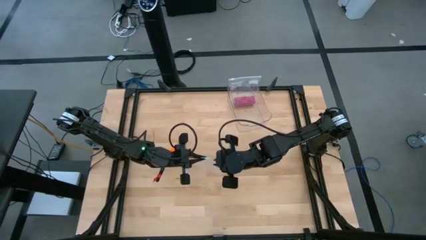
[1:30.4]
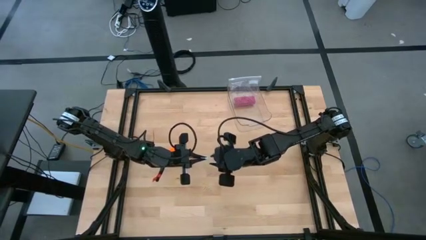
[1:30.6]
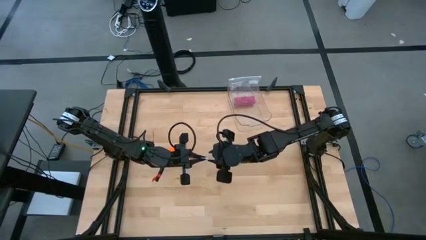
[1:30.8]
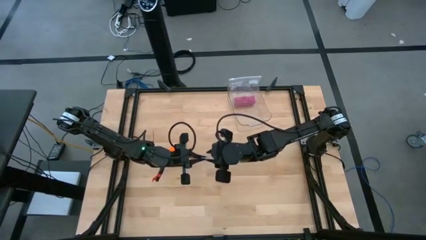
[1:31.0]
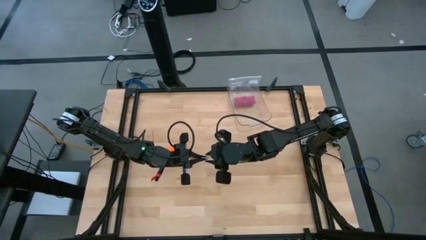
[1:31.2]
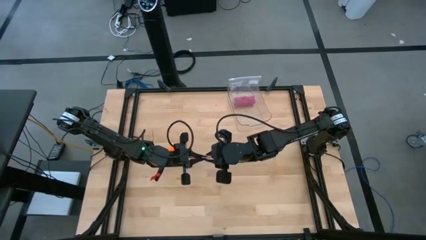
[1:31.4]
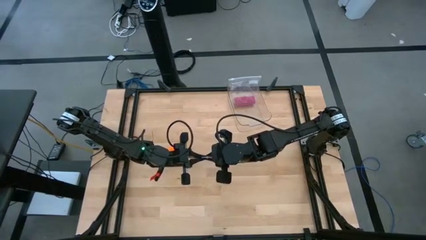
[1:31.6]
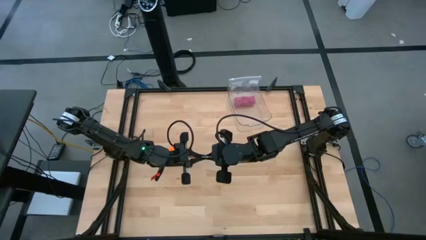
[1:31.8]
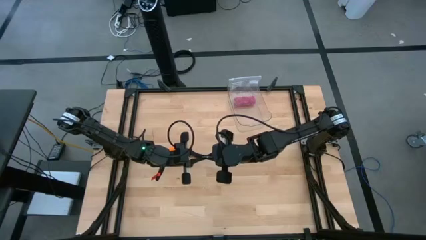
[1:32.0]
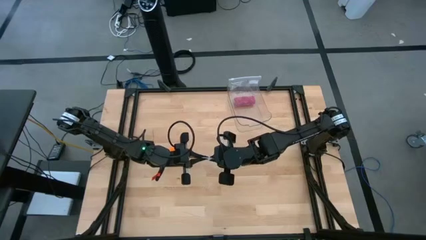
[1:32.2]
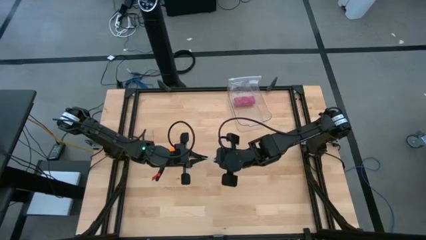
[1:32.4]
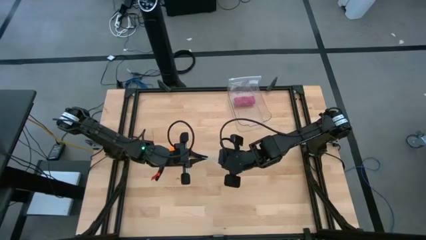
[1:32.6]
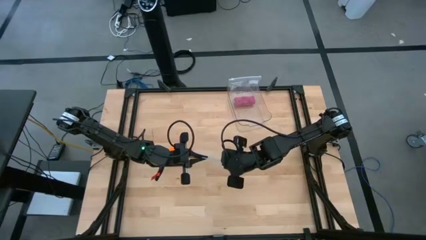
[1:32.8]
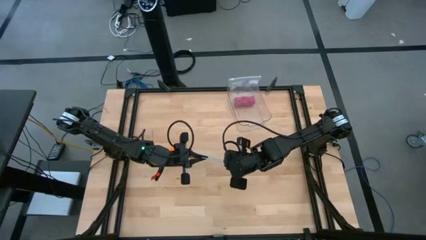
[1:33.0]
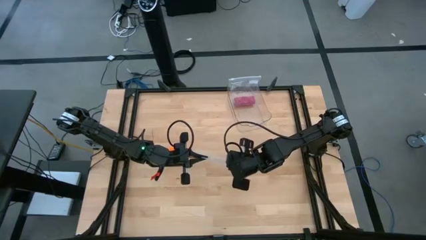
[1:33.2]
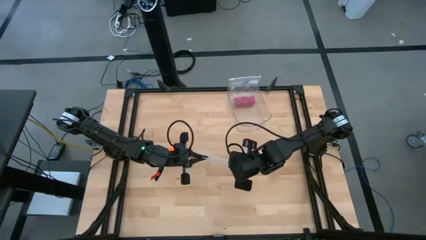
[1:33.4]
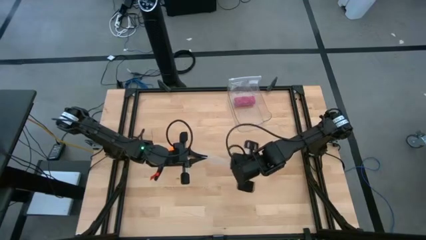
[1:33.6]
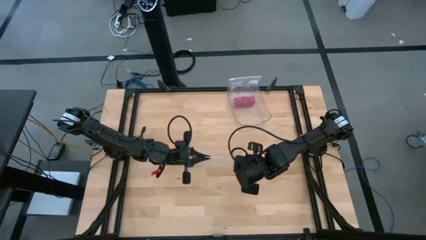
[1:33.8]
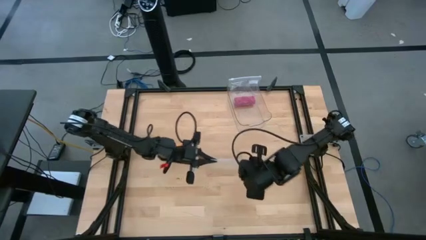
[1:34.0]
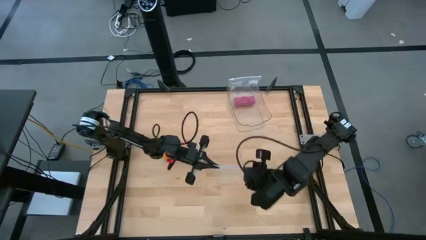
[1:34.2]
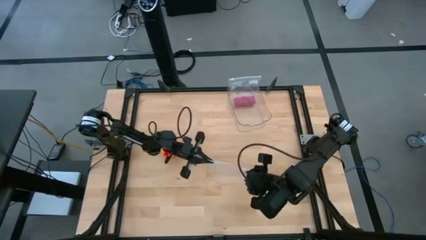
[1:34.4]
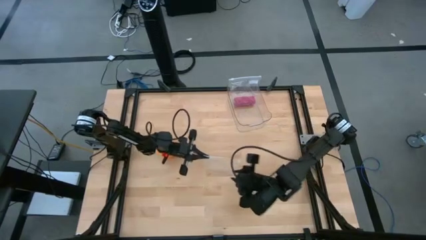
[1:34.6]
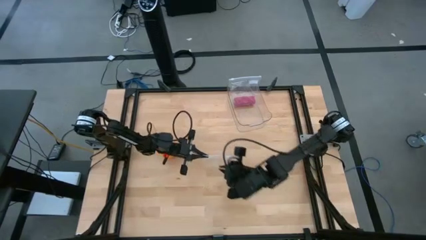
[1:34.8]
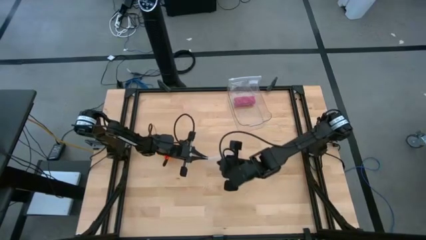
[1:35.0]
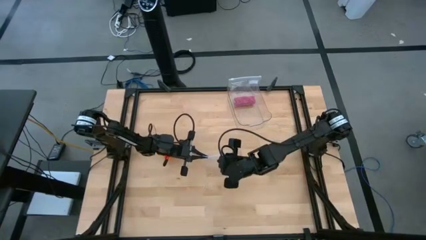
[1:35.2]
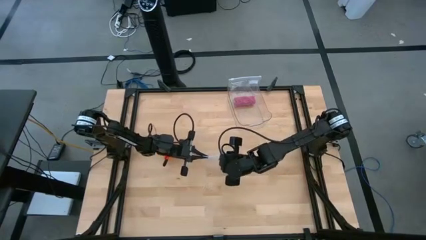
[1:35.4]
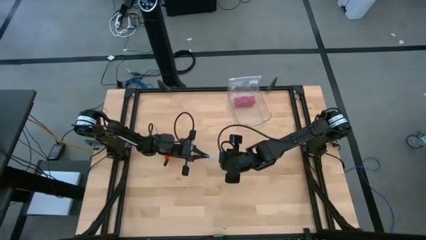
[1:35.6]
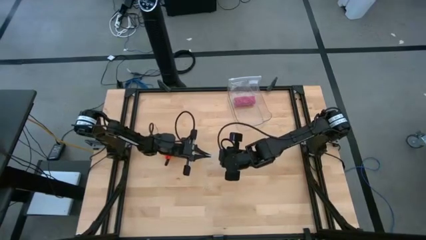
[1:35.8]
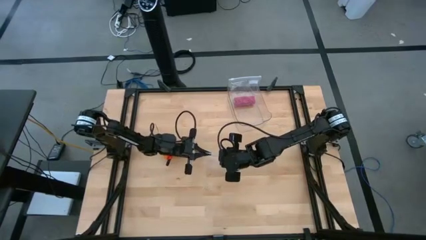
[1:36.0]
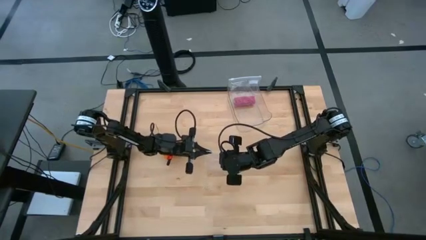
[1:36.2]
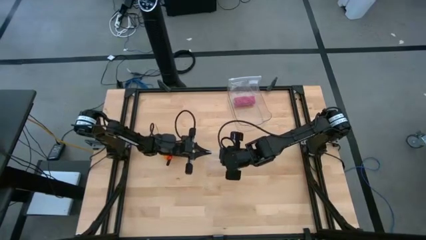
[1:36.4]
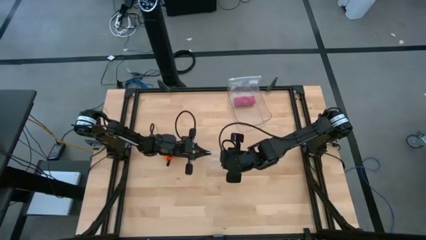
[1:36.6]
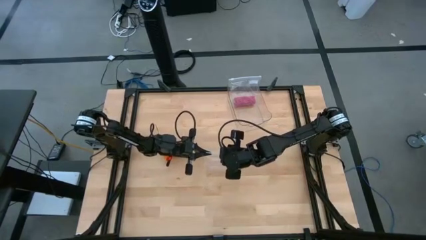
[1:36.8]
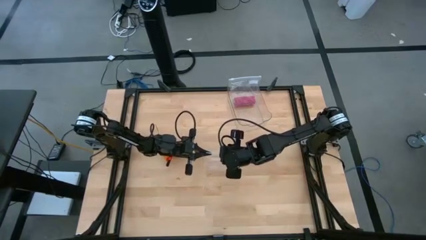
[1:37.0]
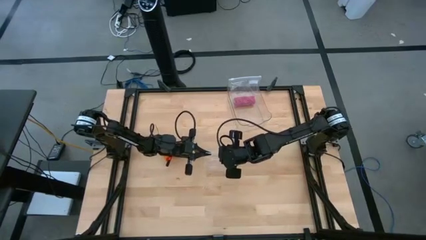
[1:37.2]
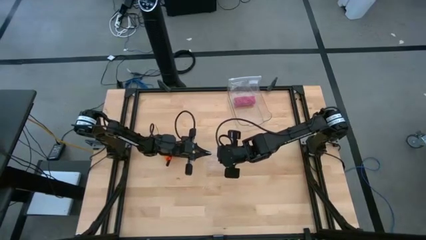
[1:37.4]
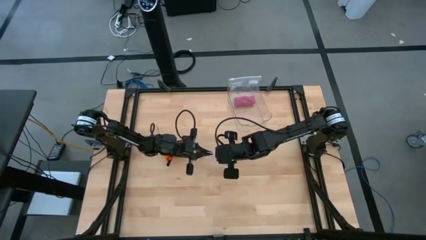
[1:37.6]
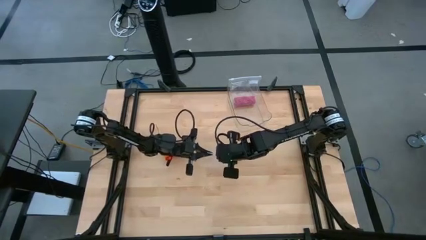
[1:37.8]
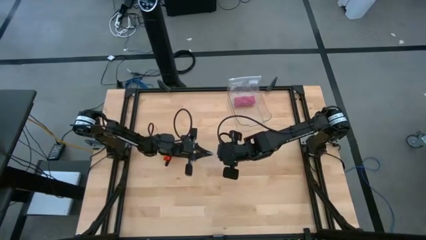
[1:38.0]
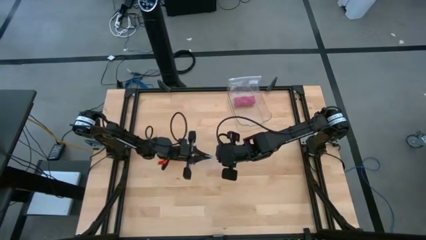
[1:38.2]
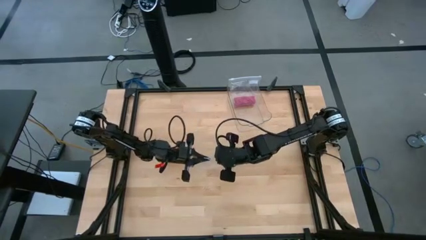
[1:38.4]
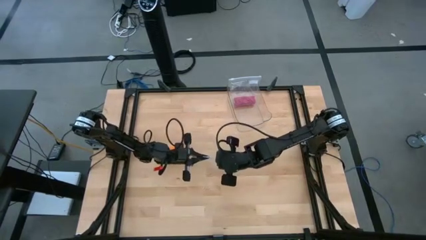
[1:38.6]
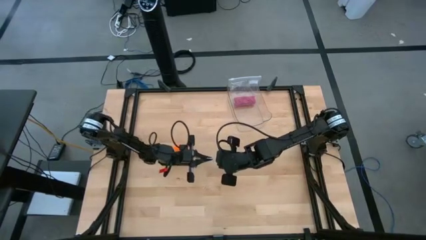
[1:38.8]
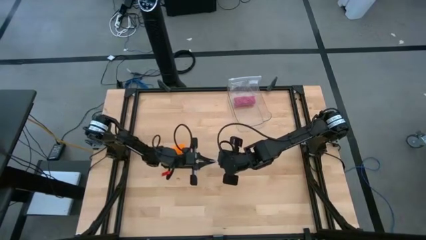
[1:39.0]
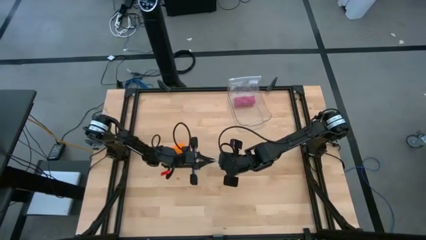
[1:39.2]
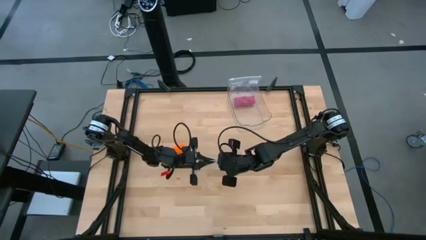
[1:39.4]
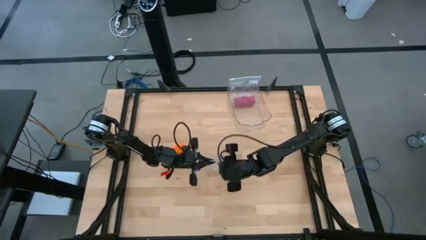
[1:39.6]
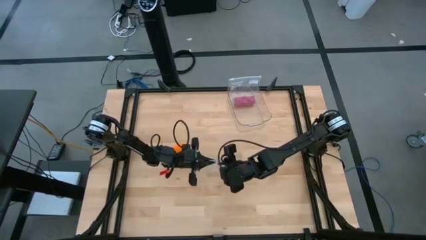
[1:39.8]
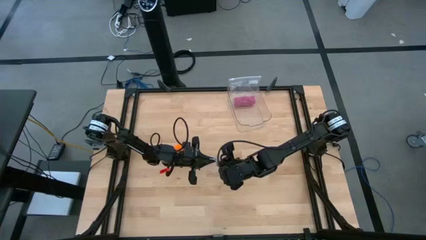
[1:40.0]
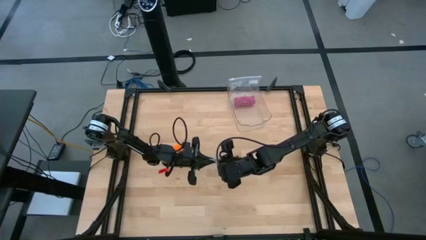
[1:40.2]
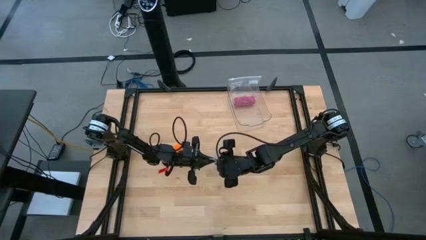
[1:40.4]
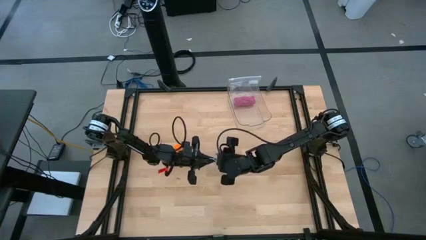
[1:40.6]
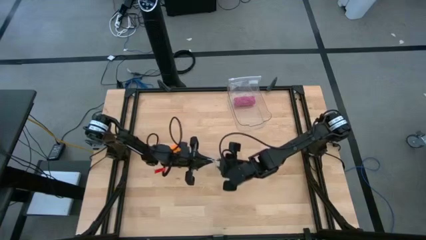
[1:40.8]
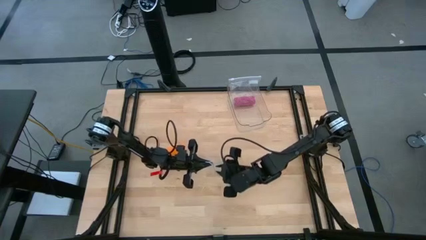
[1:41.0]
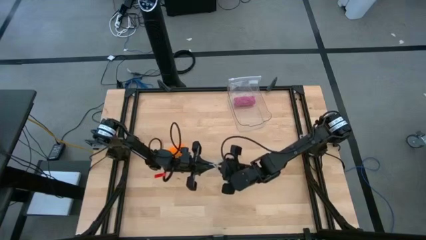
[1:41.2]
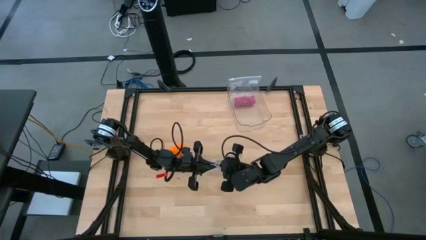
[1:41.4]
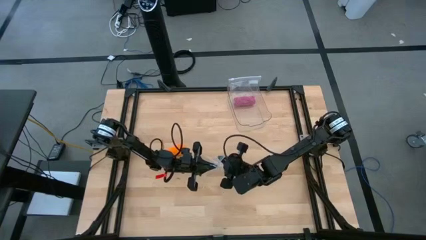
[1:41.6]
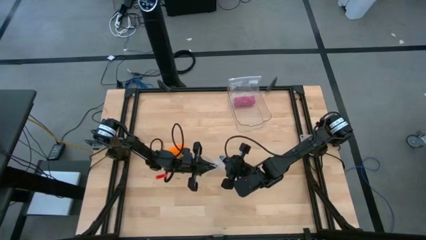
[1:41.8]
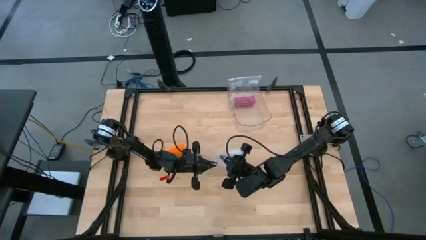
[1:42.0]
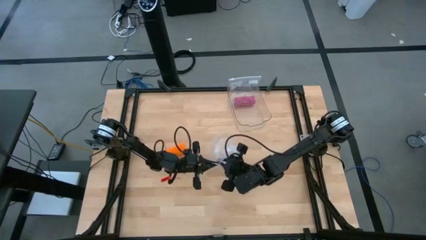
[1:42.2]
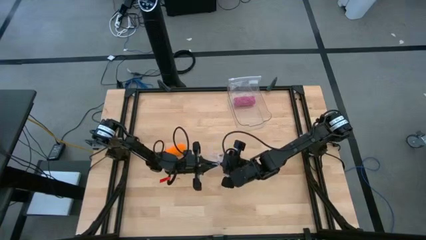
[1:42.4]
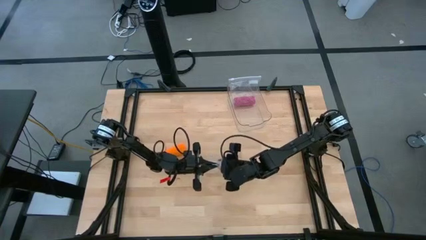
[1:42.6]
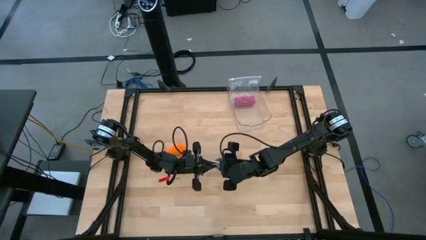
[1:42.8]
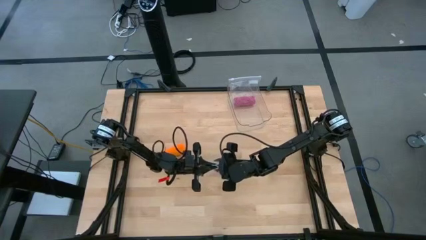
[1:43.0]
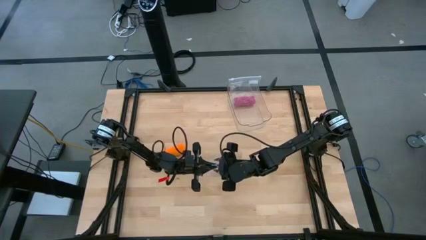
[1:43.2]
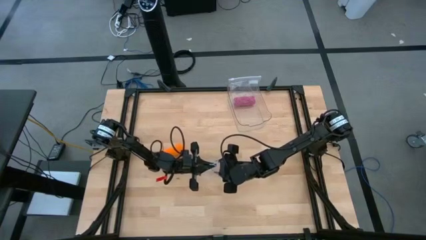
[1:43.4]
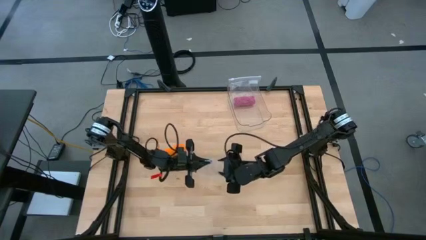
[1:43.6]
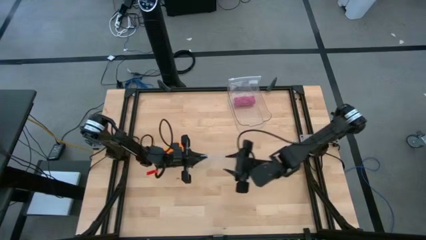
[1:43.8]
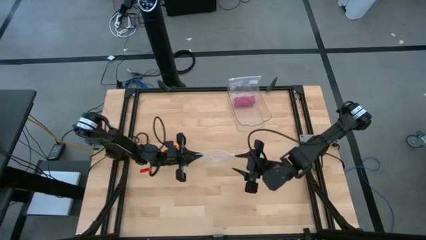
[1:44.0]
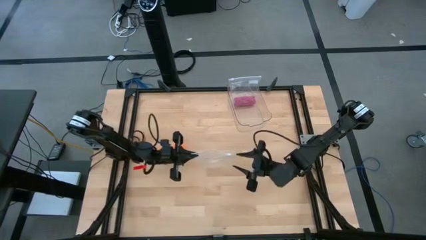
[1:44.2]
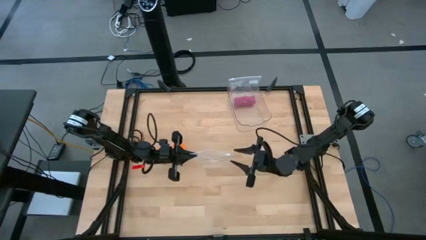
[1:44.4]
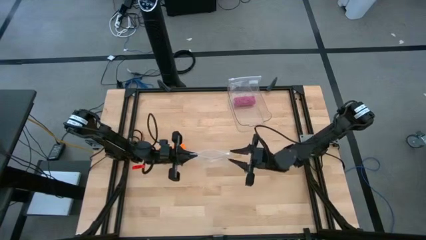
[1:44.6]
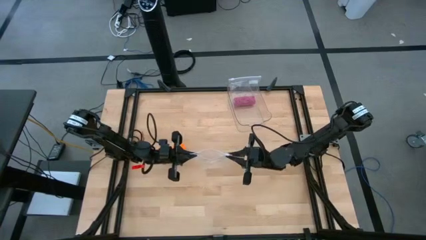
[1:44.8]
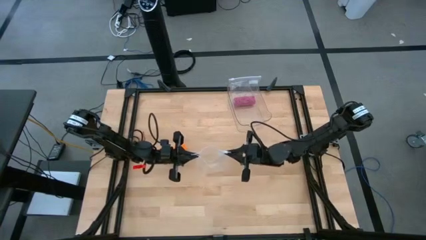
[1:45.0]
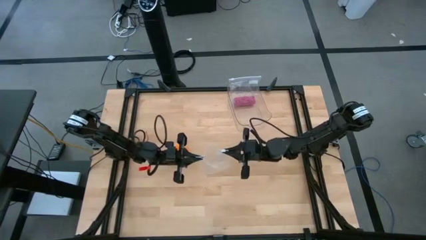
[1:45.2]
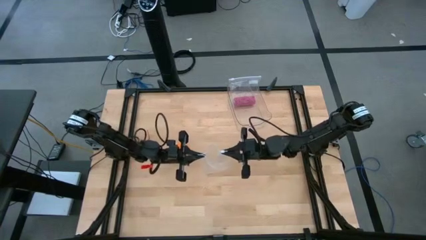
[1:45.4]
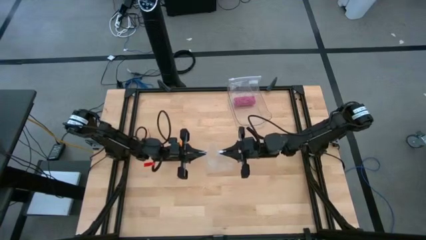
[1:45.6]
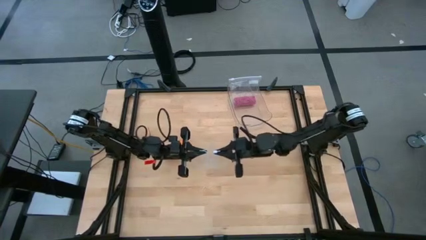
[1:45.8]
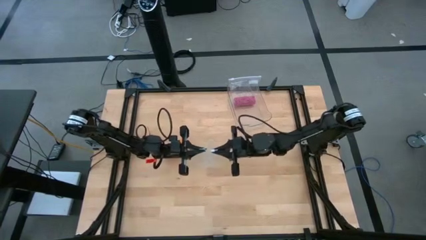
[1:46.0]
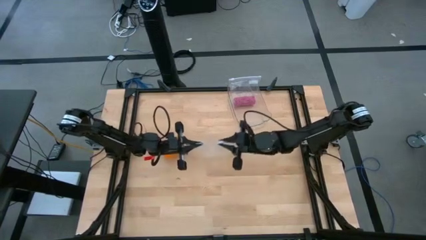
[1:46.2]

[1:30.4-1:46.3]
Task: Roll bandage
Open the transparent zip bag
